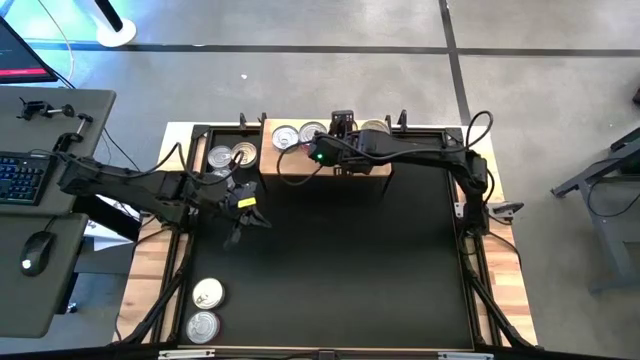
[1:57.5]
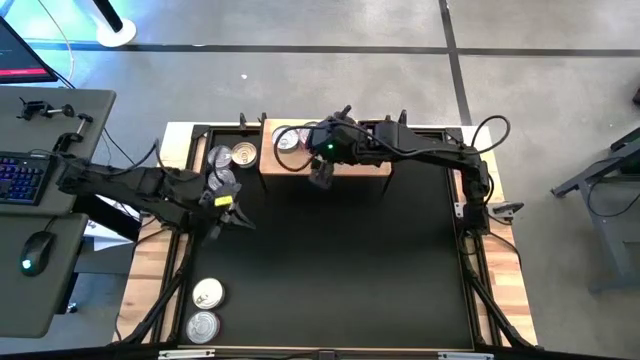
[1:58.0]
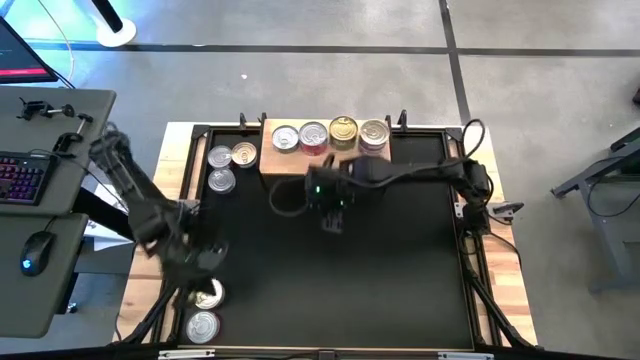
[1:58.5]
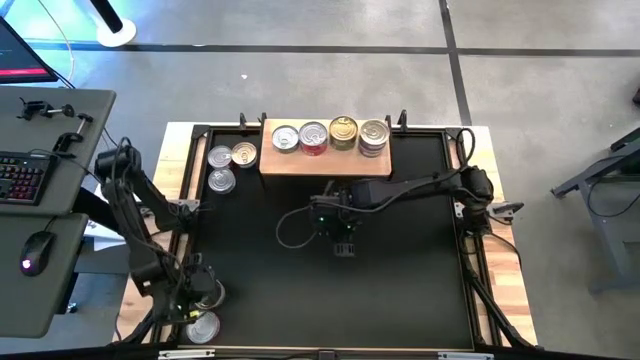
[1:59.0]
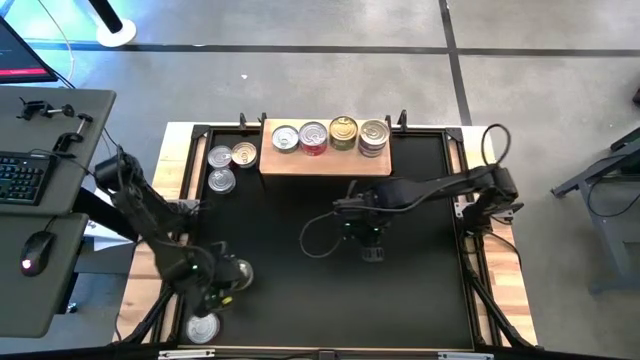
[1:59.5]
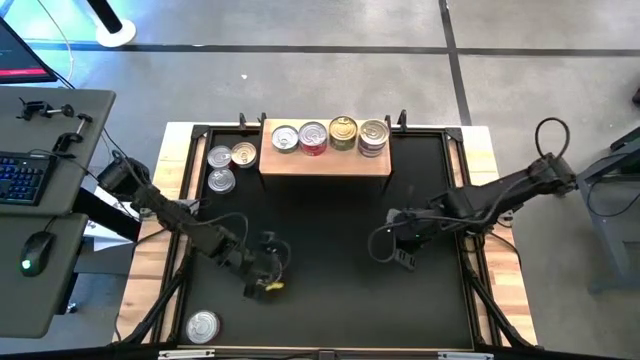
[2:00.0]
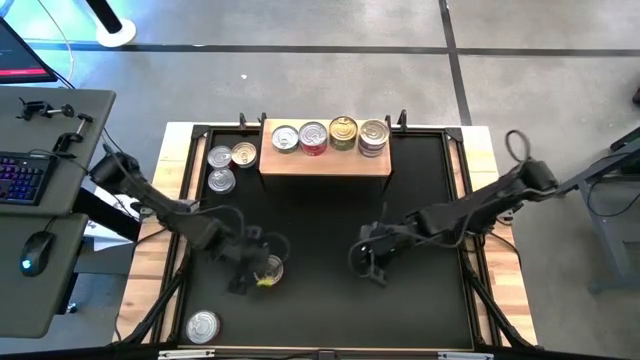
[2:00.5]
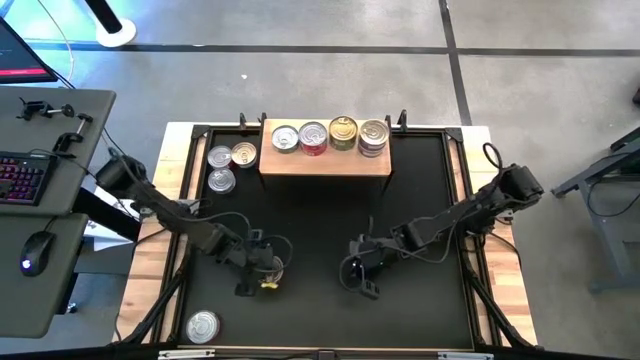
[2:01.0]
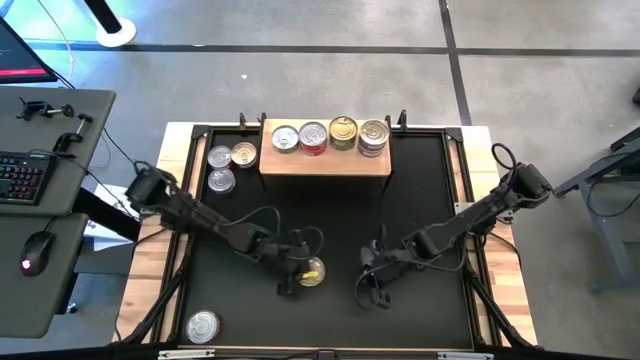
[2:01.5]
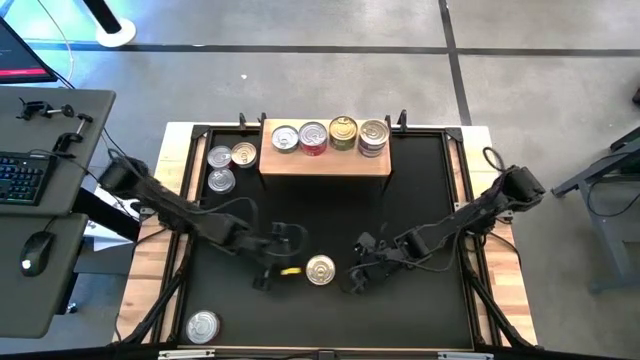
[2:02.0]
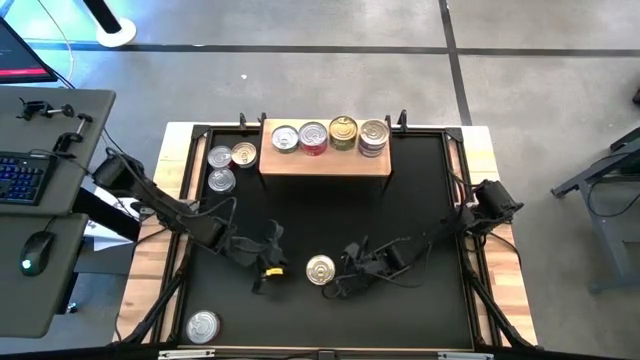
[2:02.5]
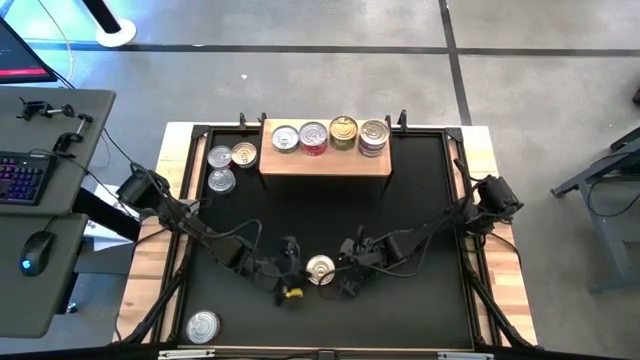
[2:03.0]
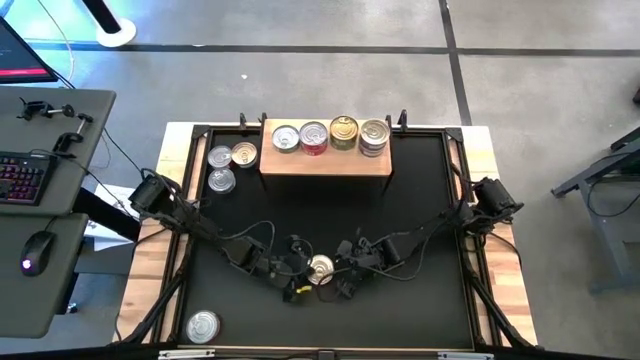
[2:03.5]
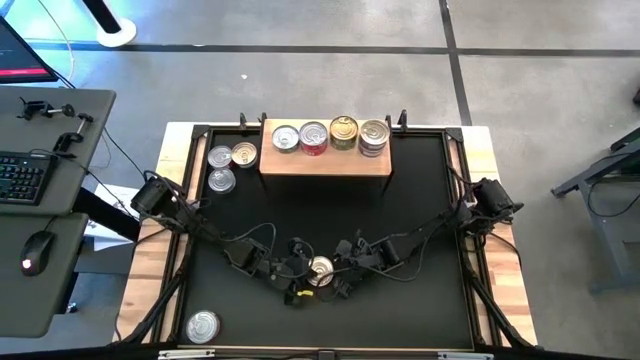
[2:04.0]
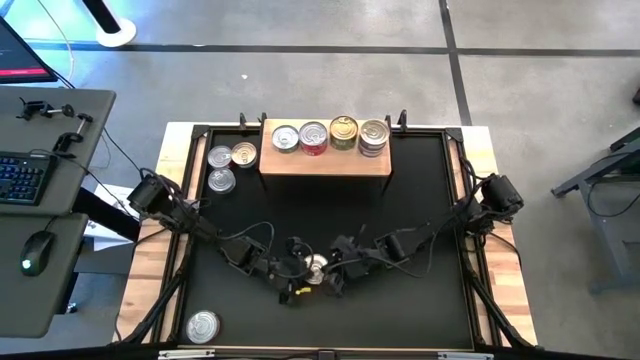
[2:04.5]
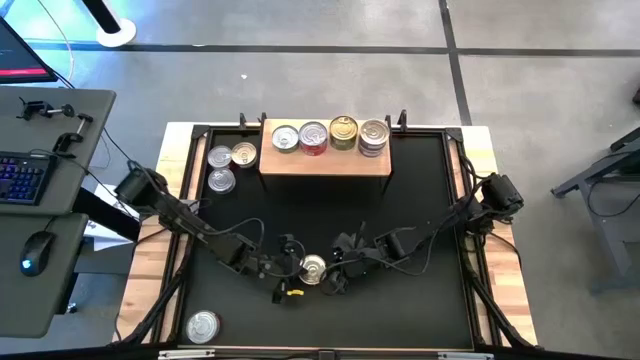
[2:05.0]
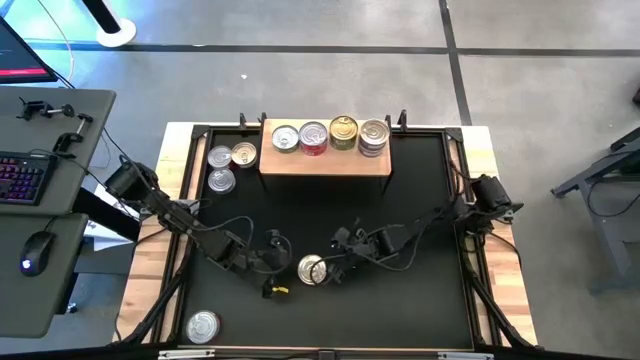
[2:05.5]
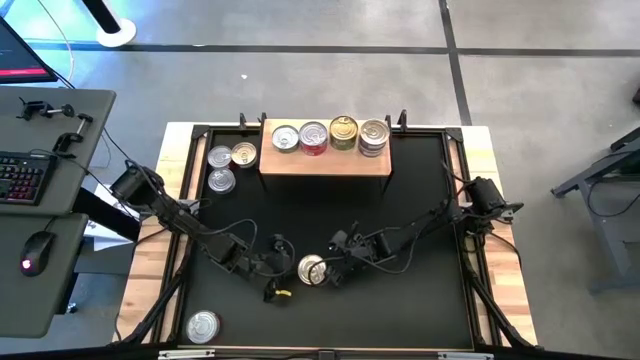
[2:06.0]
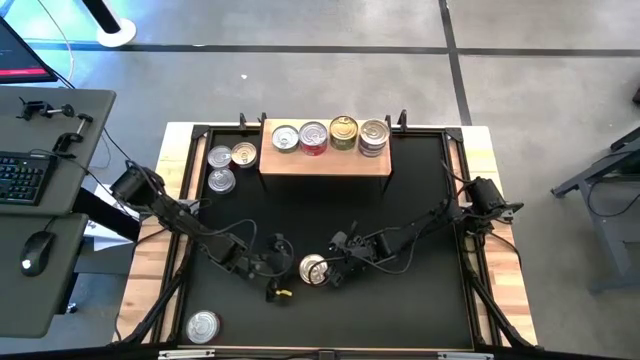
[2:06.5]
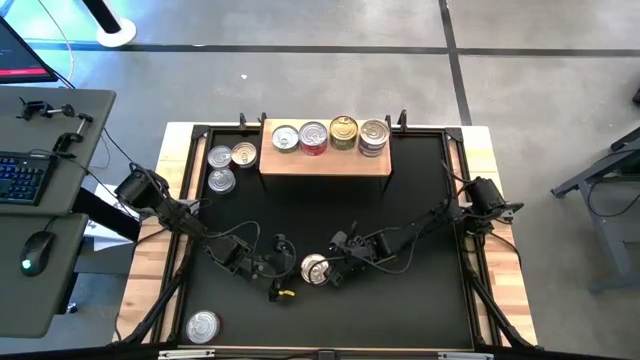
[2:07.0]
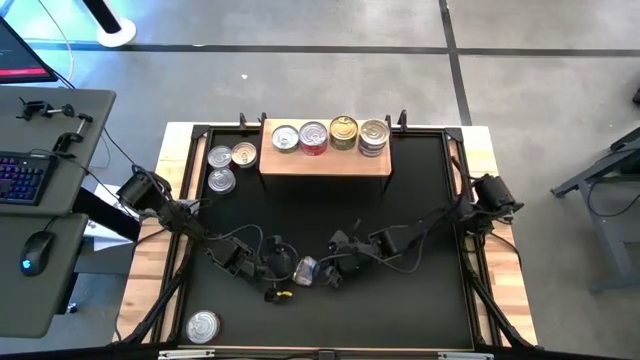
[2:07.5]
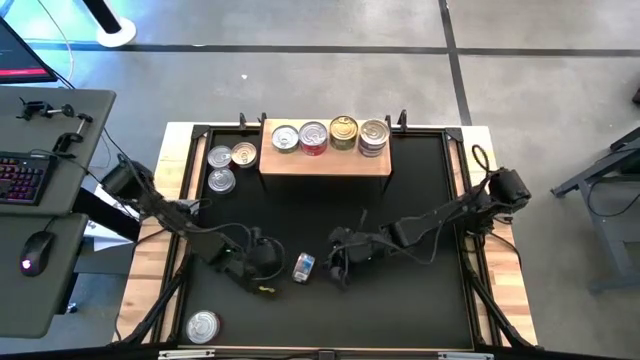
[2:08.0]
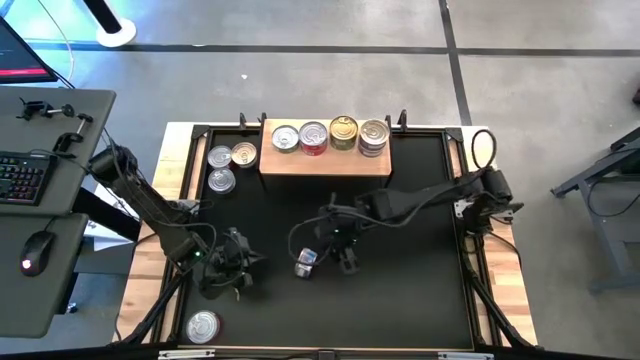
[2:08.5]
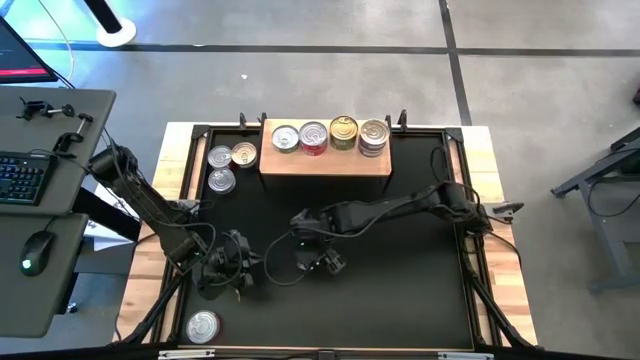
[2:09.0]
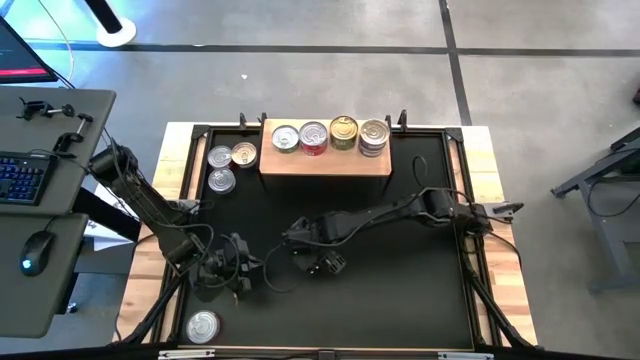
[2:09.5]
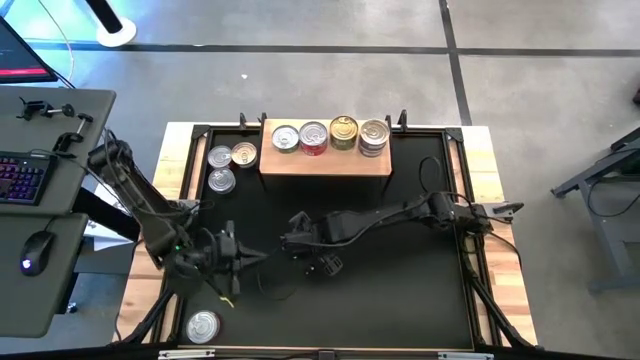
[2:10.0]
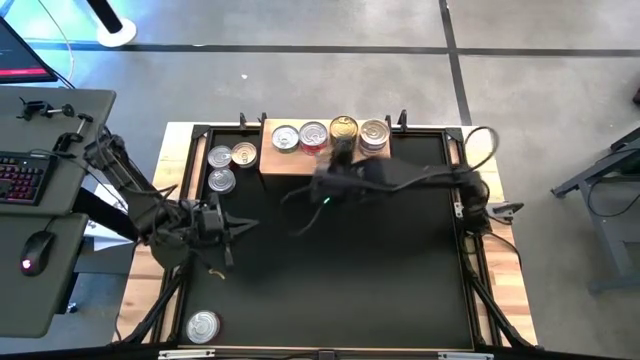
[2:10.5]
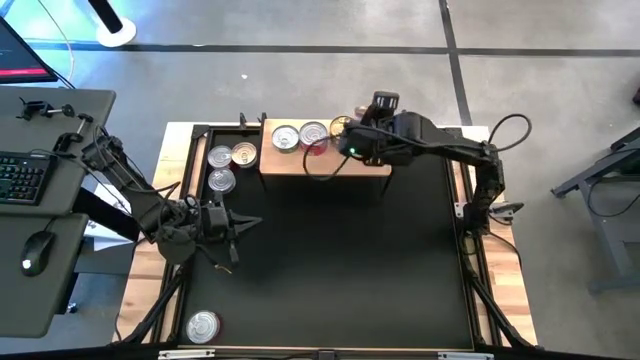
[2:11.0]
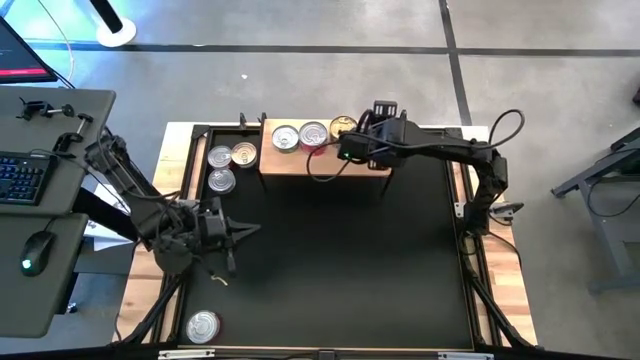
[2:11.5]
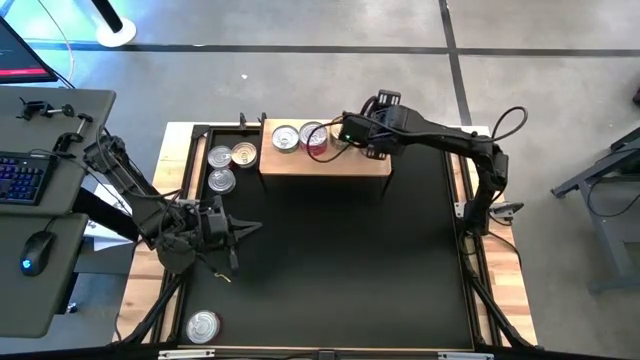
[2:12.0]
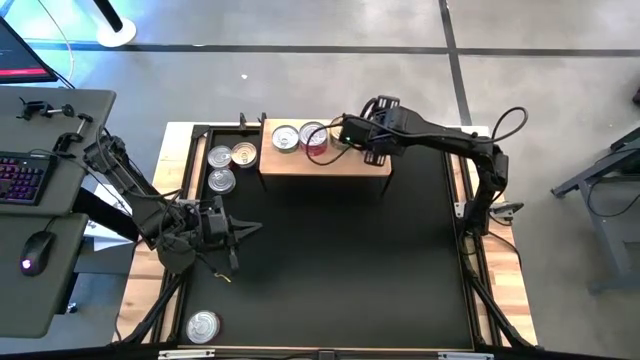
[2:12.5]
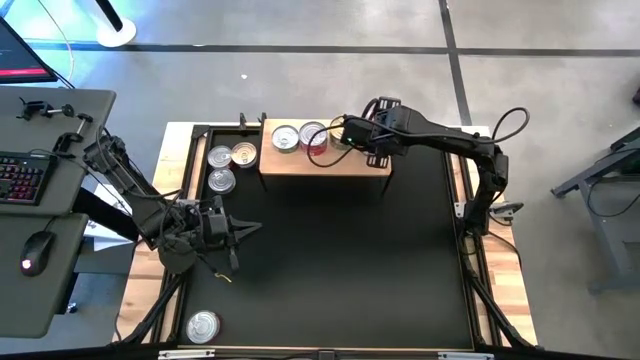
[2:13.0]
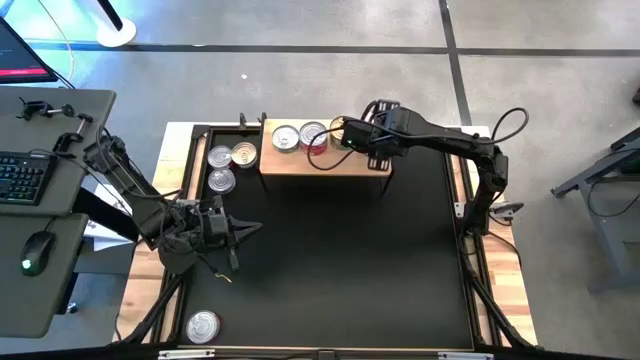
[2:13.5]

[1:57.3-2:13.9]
Task: Stack canned seafood by type on shelf
Stack the bottom blue tuna can on top of the other blue tuna cans

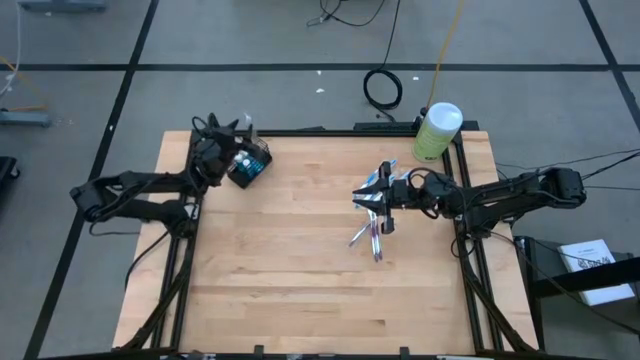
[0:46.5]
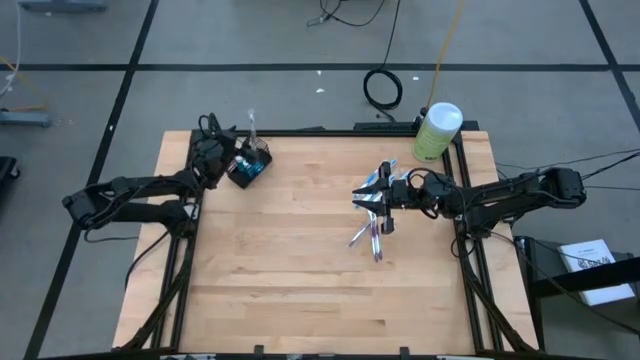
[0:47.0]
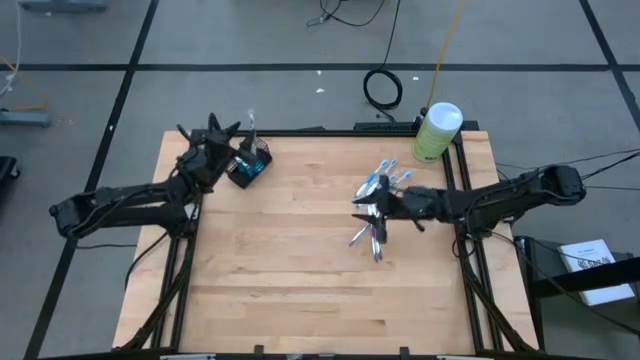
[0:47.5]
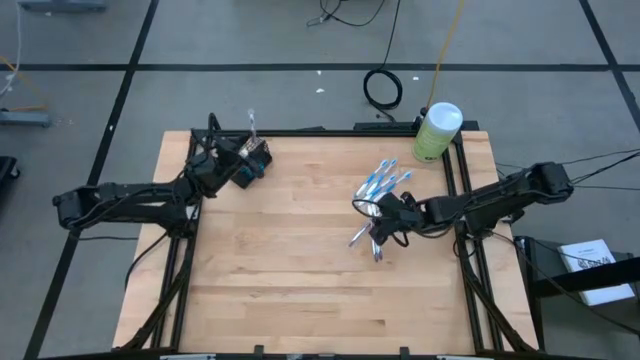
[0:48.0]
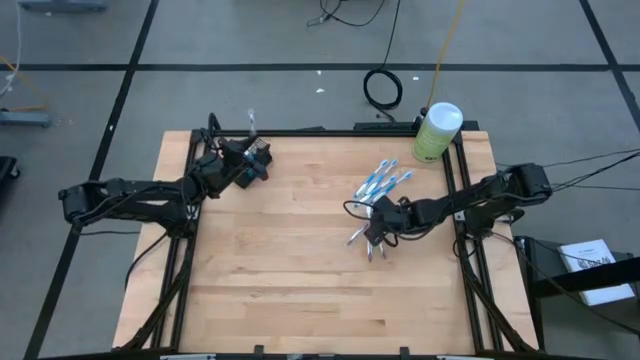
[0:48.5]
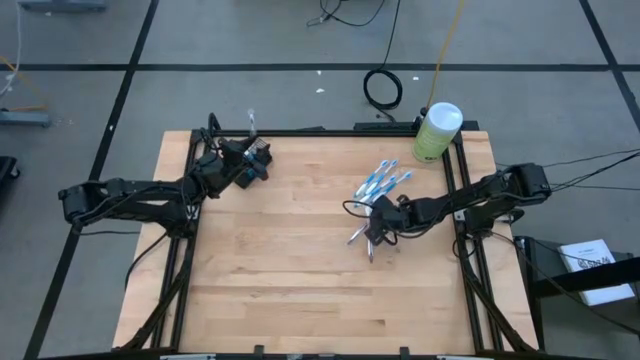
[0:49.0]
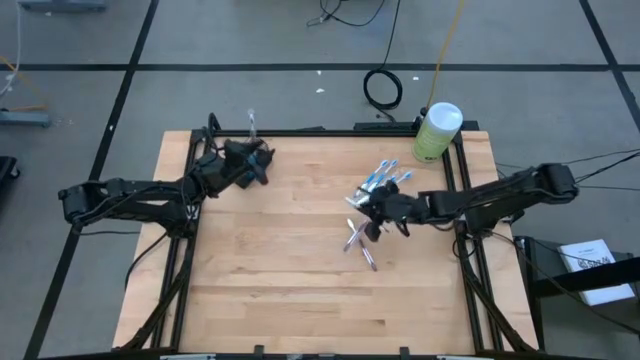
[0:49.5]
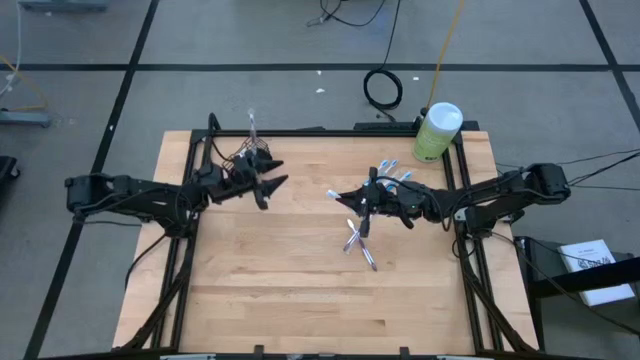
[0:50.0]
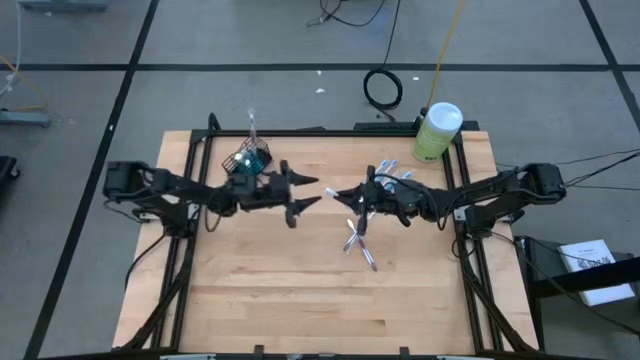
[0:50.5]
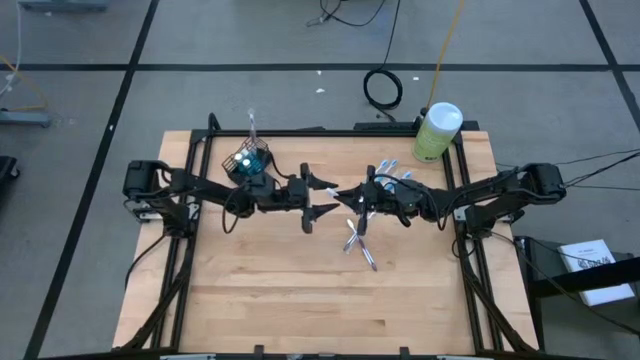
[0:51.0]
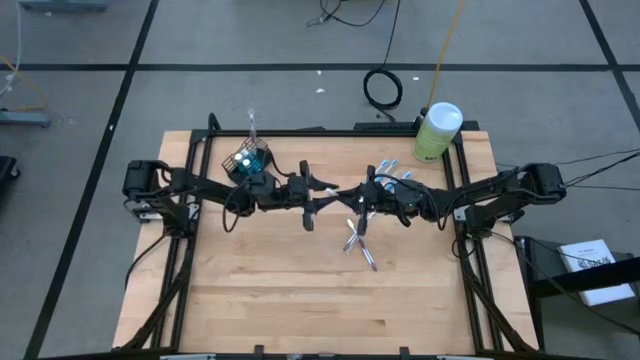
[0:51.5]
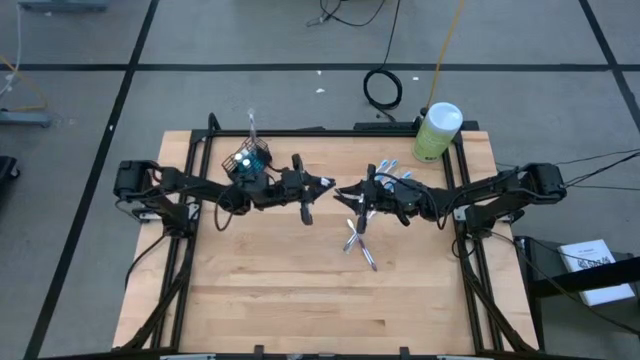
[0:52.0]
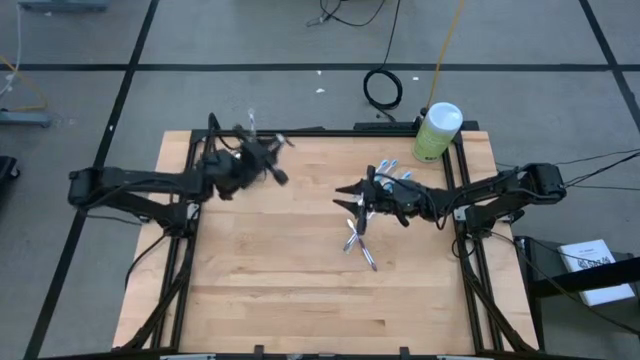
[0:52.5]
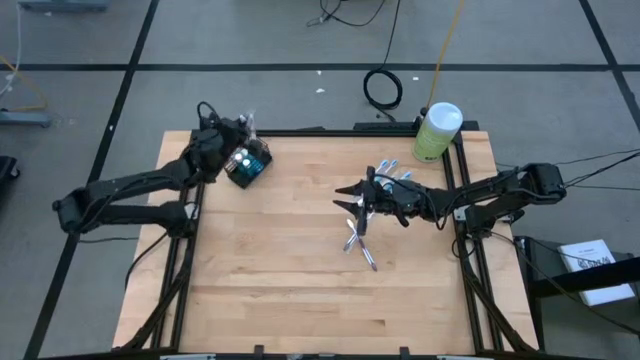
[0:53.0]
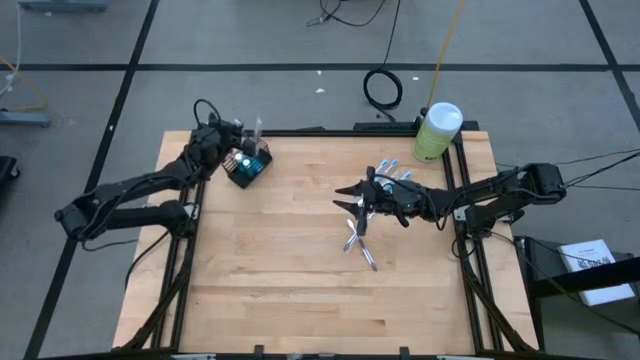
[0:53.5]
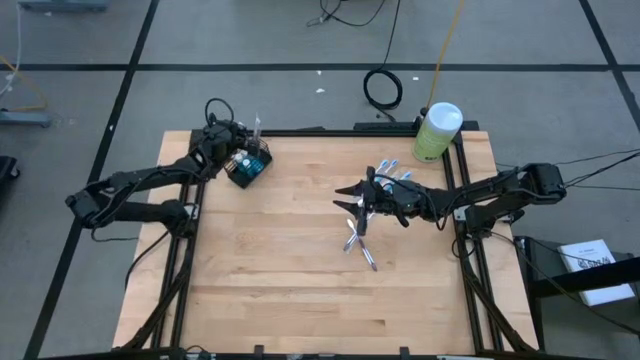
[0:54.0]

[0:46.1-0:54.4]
Task: Pick & Place toothbrushing station
Put the purple toothbrush into the right compartment of the wire organizer
